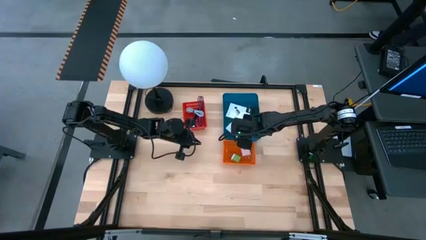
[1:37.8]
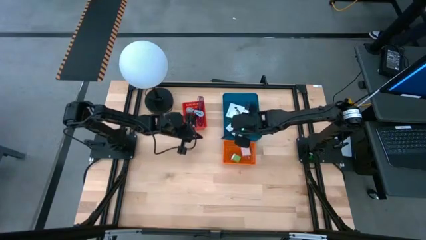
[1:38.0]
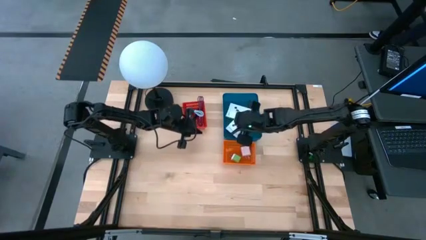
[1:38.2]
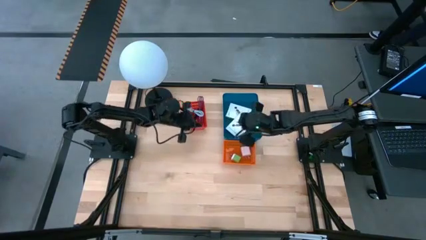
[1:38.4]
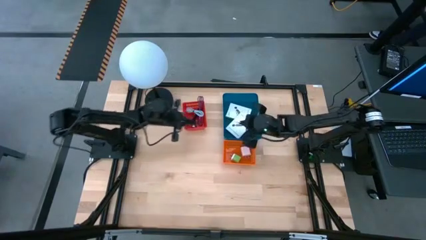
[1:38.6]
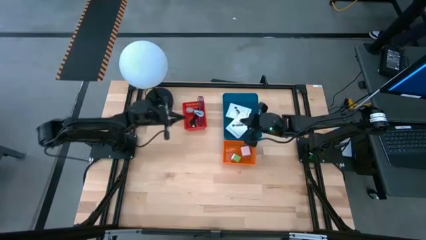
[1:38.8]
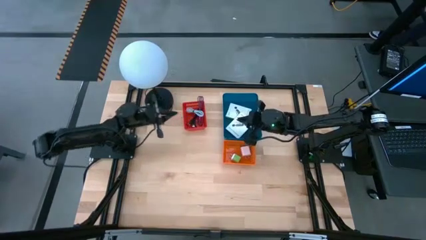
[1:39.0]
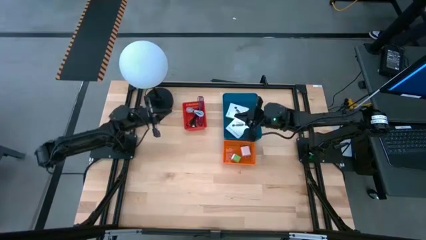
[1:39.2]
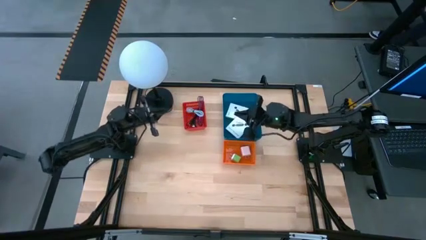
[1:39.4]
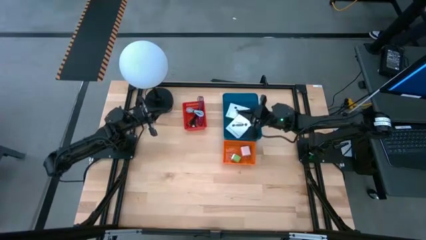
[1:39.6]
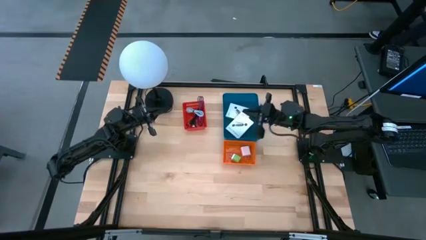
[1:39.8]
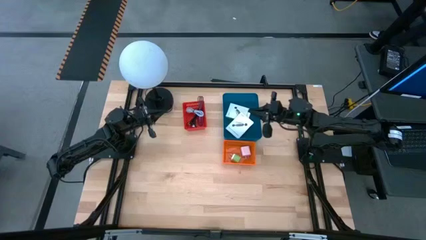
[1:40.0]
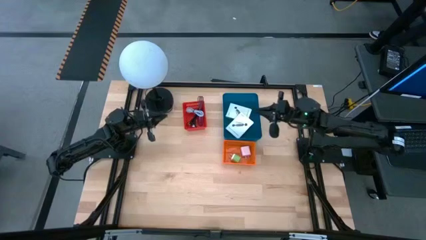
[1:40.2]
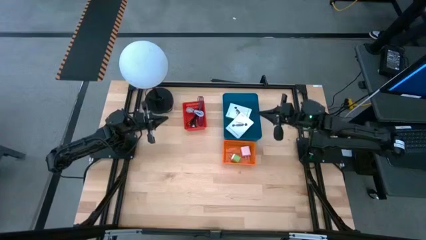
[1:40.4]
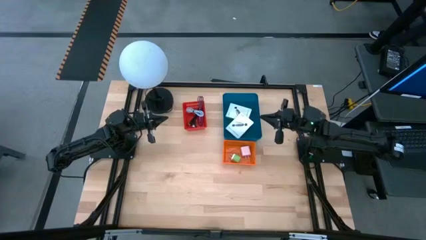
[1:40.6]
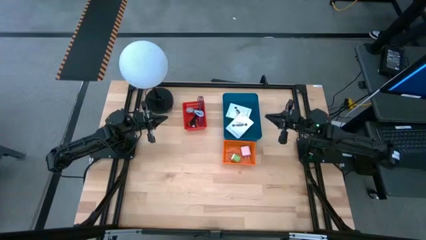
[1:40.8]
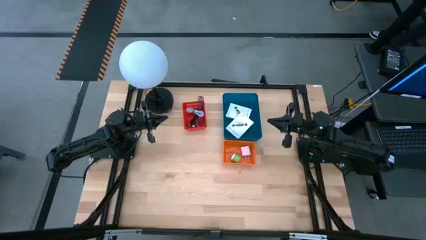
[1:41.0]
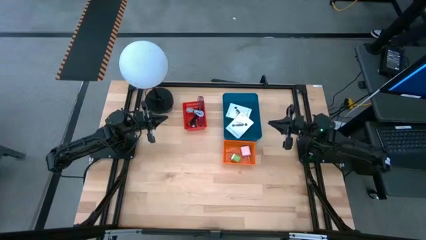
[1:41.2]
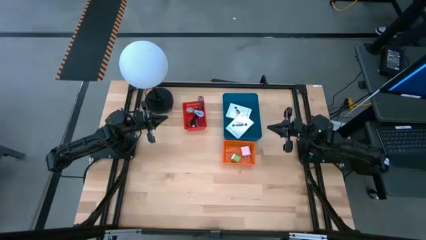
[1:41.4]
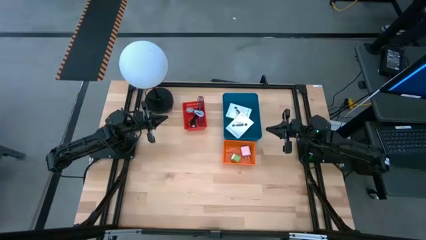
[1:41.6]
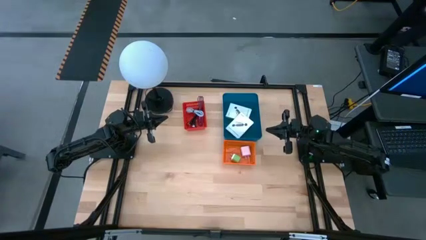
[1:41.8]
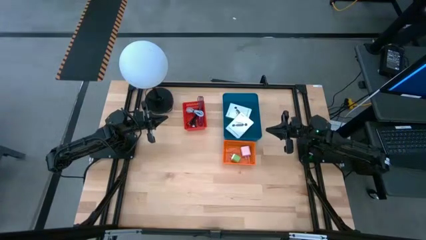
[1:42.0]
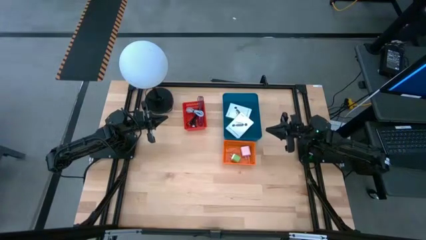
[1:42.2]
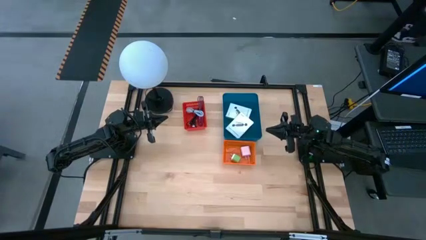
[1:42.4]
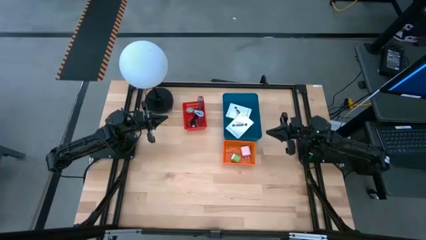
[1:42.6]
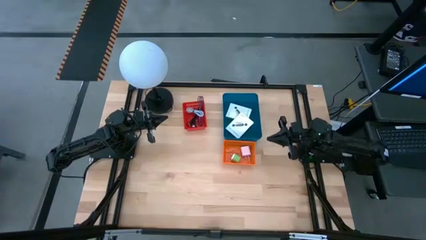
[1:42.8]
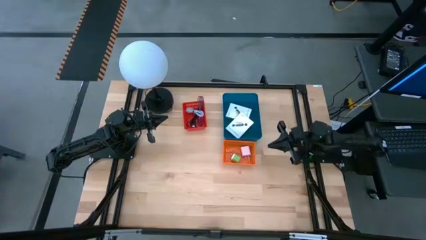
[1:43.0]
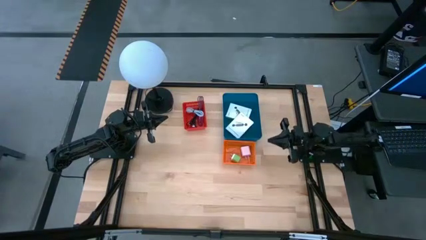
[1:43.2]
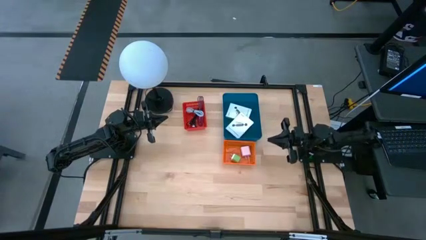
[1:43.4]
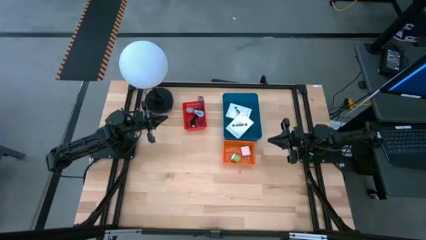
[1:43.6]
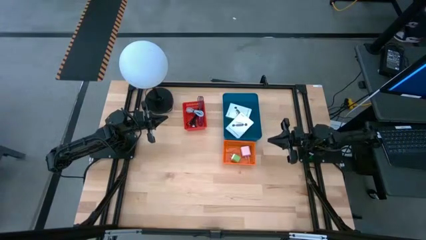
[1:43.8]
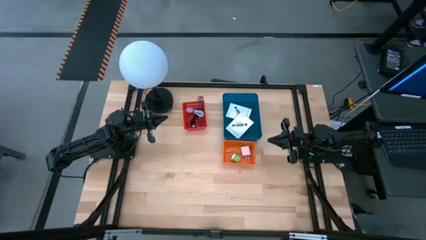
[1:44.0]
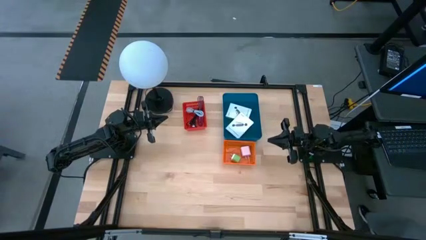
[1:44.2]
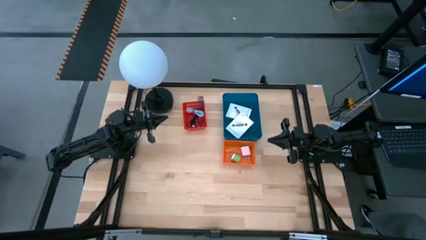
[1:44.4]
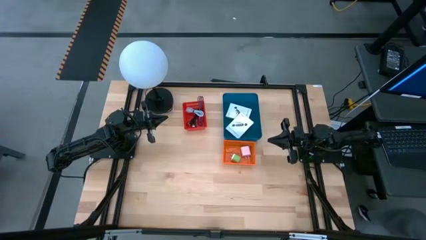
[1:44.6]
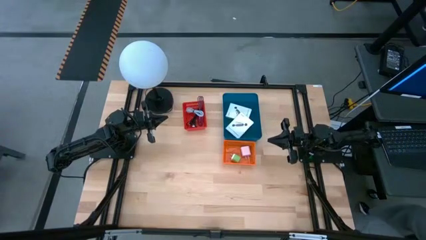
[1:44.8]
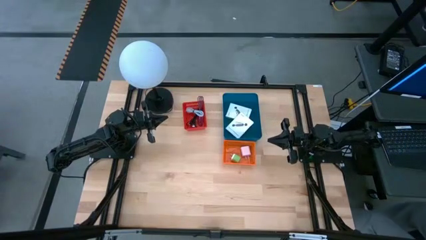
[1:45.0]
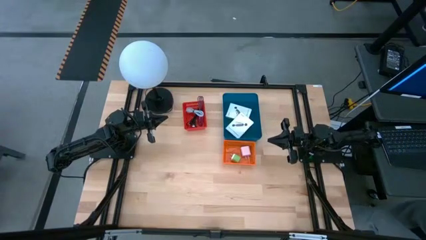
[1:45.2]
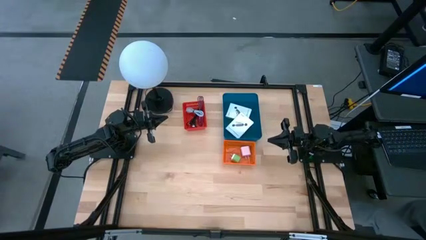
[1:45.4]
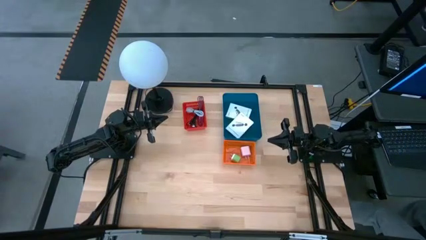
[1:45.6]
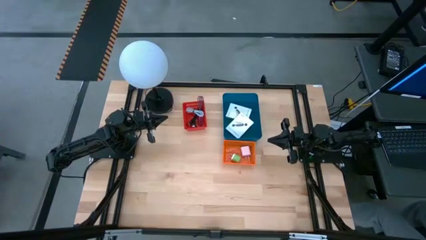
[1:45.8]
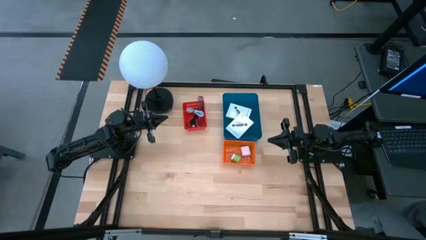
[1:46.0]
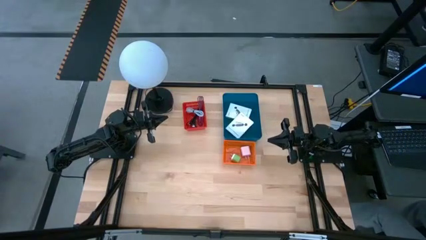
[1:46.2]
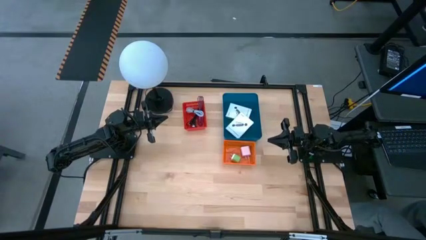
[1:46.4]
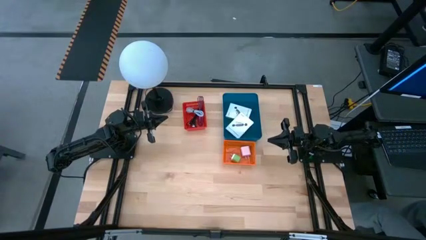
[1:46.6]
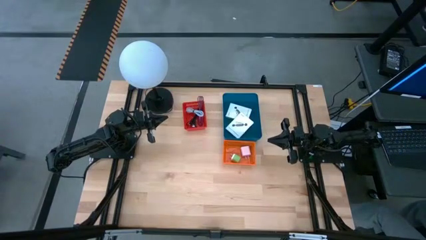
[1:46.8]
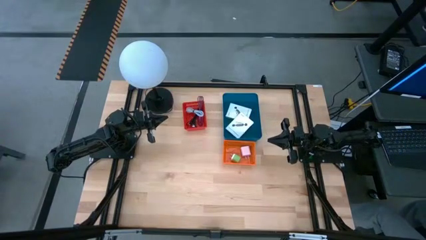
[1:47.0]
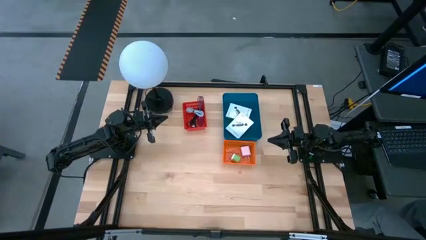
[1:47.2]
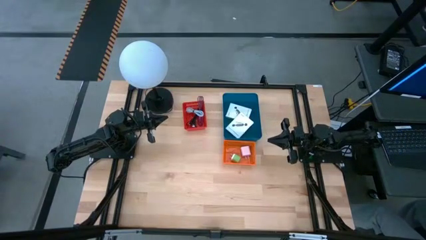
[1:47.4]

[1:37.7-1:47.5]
Task: Pick and place items into bin
Return to Home Position
